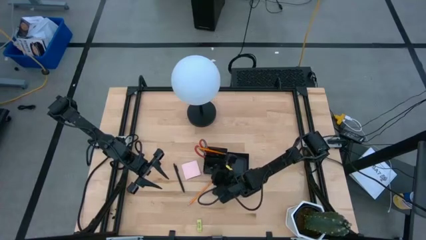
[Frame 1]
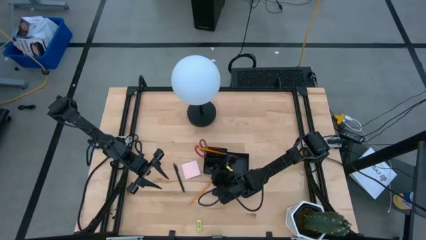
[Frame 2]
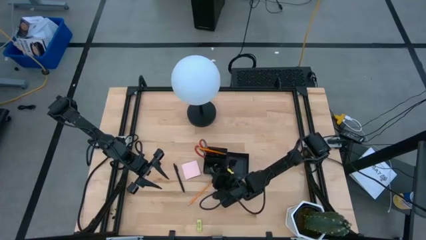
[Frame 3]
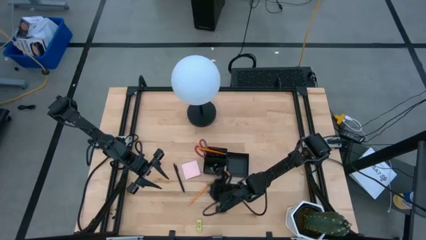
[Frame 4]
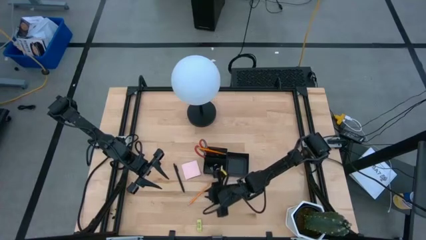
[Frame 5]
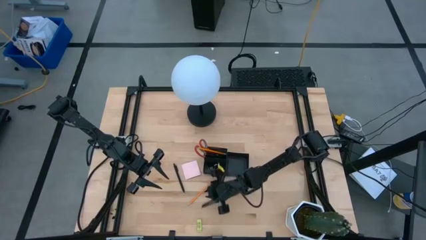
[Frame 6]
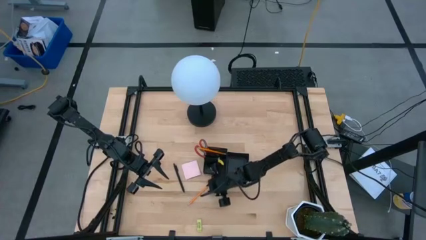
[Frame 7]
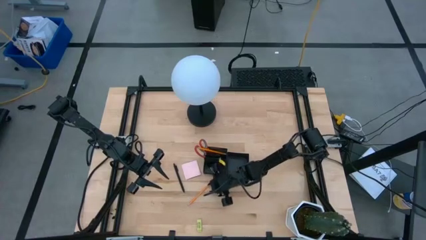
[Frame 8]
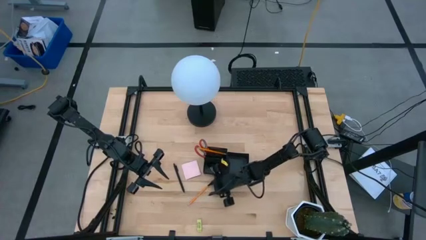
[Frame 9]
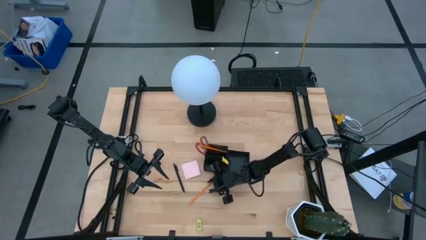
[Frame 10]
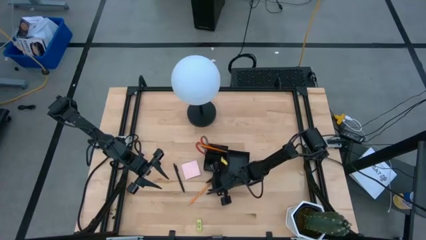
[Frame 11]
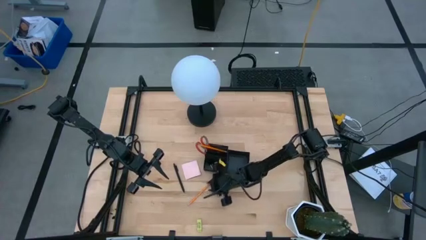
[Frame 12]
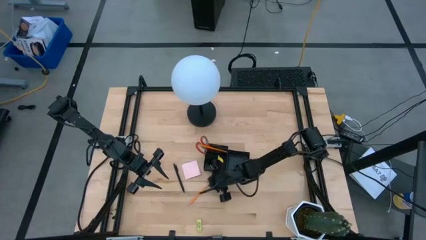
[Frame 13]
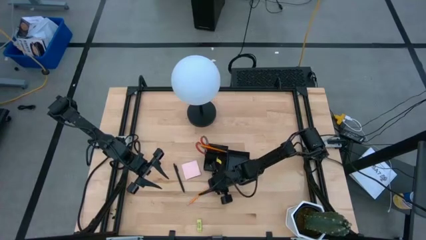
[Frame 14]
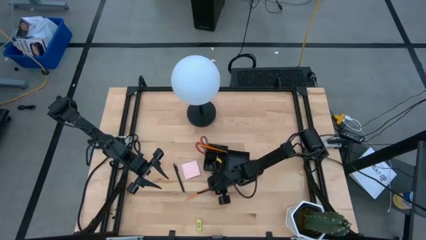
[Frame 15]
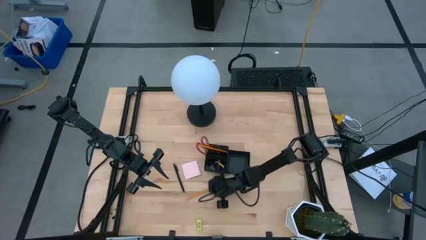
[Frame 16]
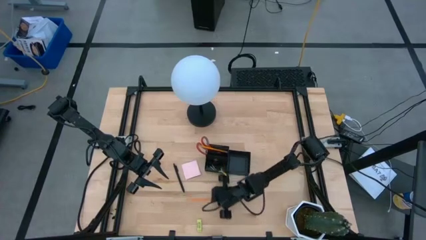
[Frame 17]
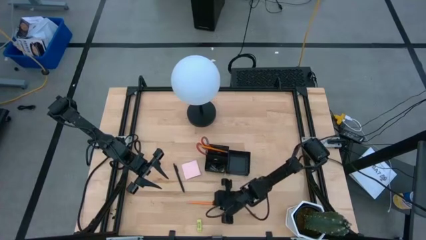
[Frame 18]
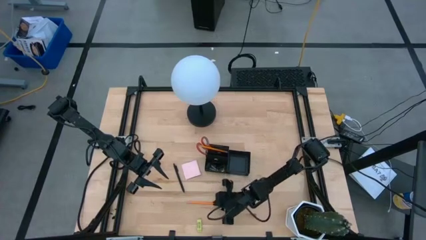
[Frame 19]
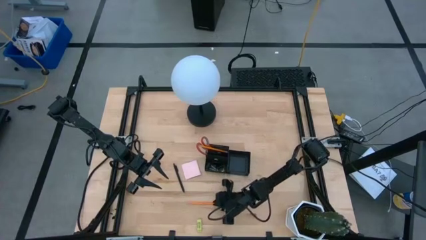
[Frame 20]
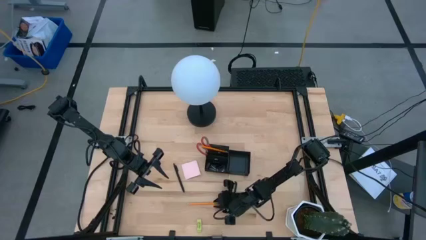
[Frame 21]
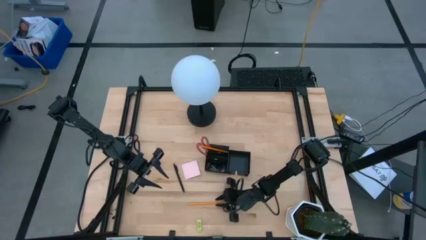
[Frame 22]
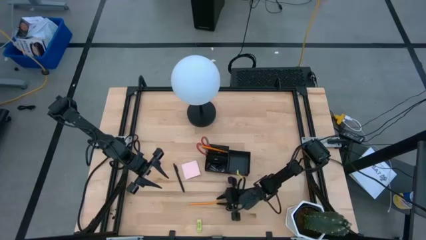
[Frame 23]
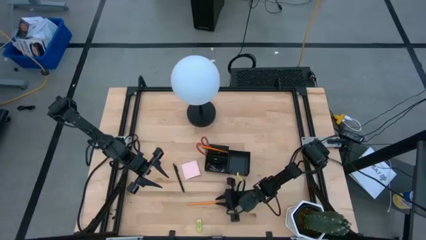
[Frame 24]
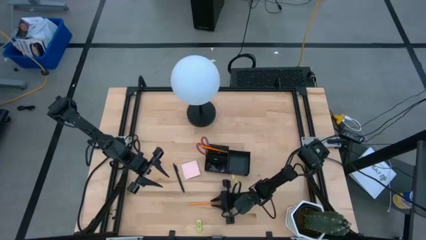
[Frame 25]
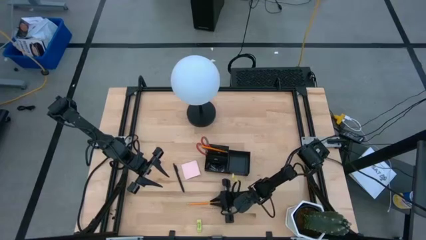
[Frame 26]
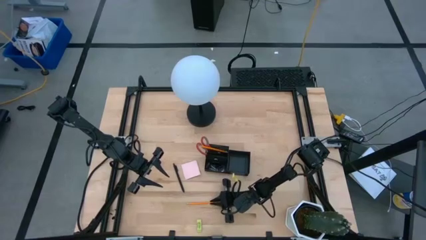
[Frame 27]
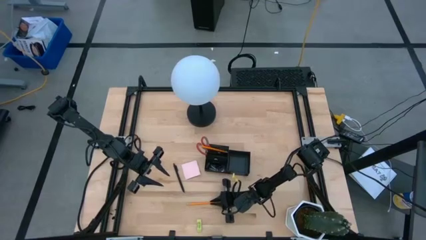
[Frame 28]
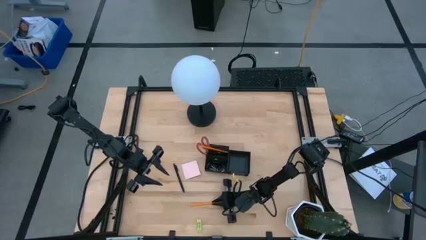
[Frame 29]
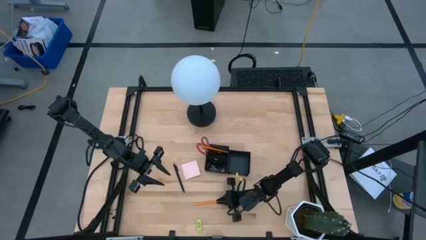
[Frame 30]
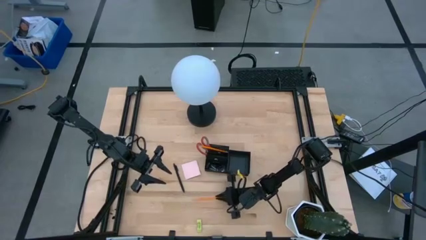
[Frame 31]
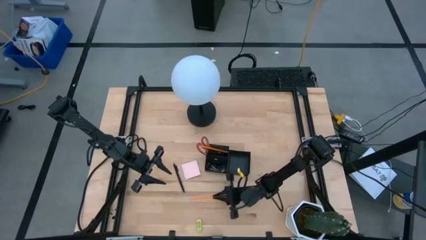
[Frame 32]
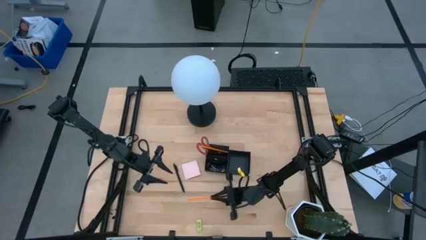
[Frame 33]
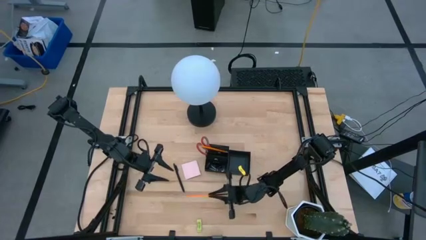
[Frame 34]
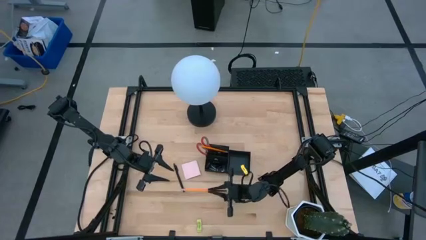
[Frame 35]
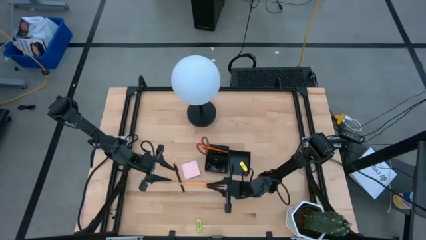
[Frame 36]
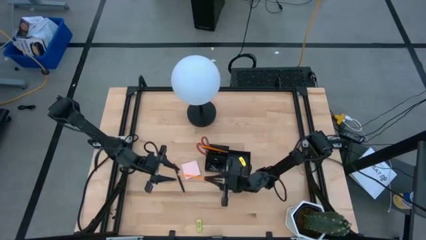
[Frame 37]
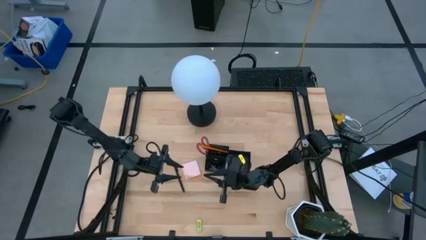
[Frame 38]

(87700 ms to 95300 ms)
Task: Pick and place office supplies into organizer
Put the yellow pencil into the desk organizer

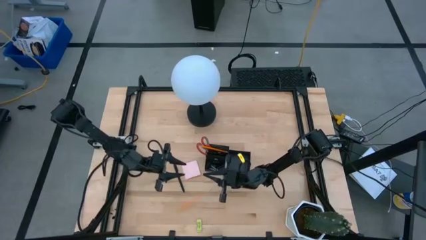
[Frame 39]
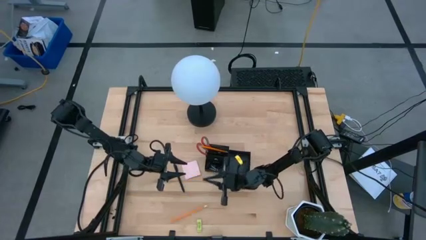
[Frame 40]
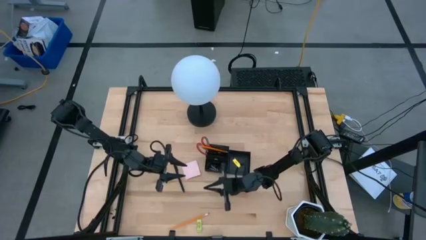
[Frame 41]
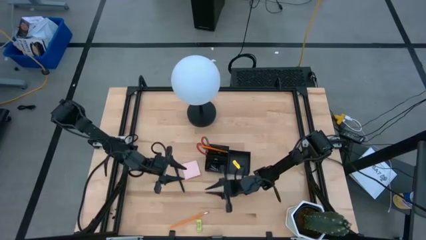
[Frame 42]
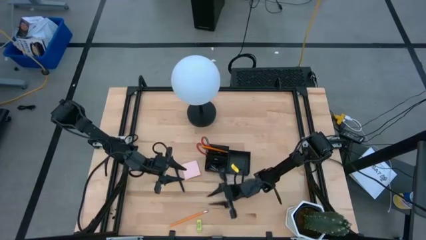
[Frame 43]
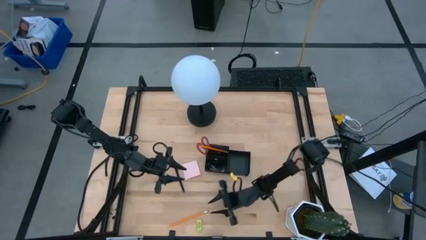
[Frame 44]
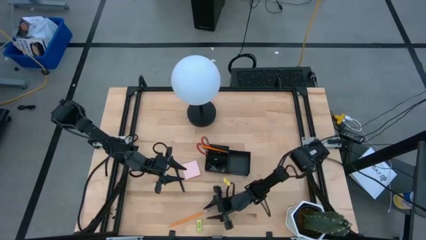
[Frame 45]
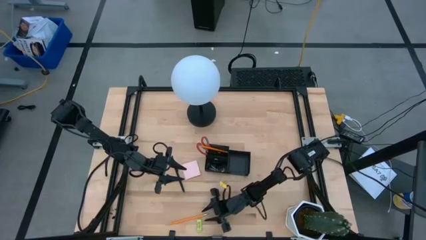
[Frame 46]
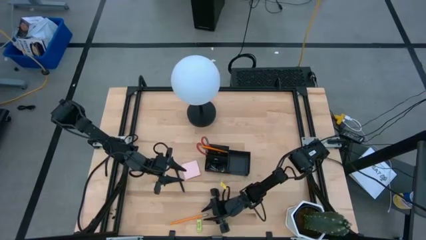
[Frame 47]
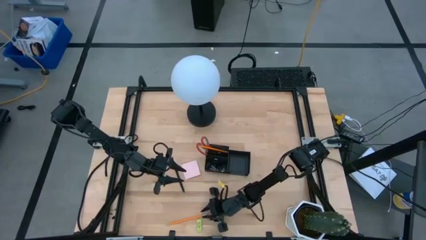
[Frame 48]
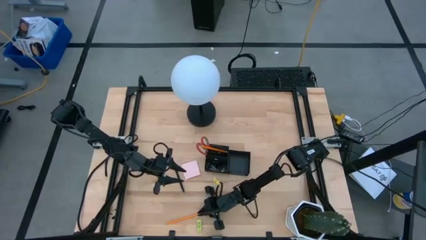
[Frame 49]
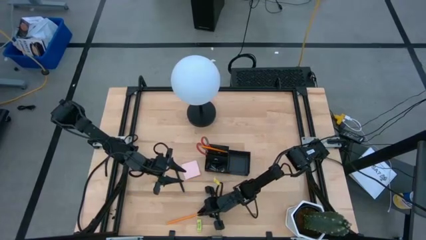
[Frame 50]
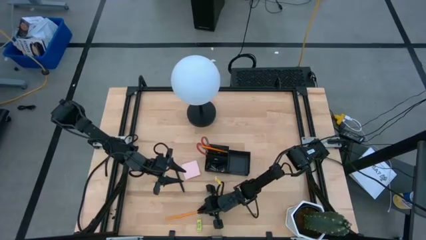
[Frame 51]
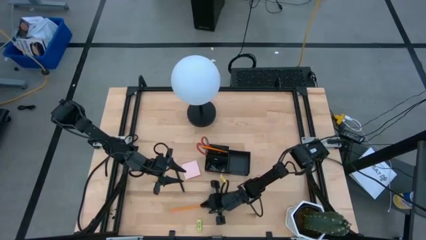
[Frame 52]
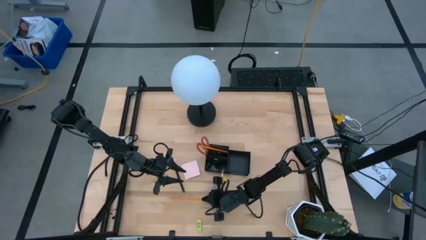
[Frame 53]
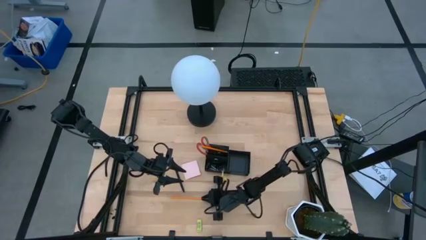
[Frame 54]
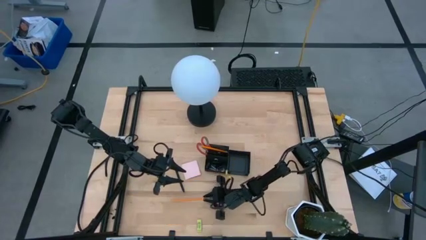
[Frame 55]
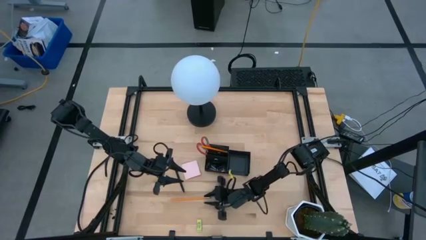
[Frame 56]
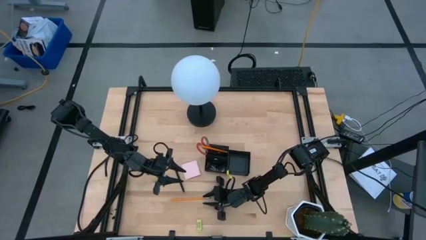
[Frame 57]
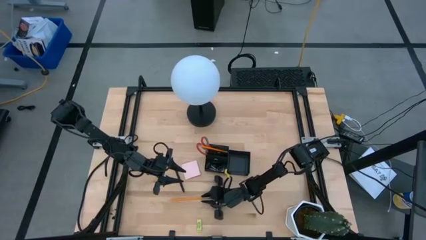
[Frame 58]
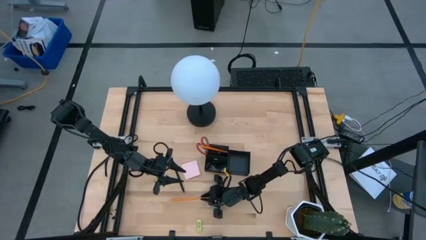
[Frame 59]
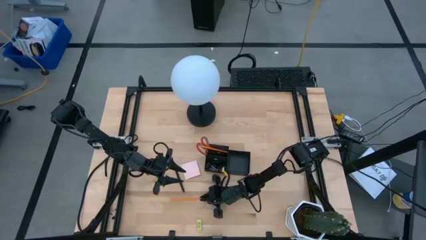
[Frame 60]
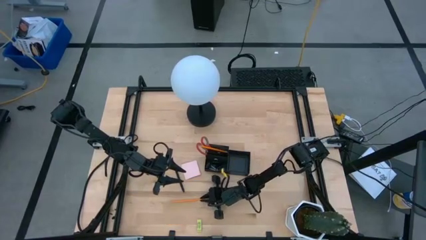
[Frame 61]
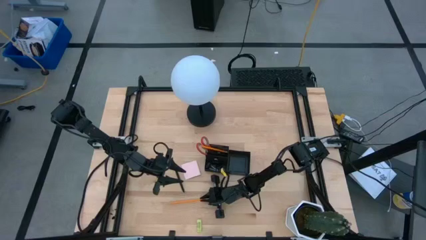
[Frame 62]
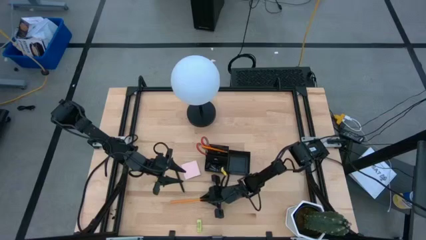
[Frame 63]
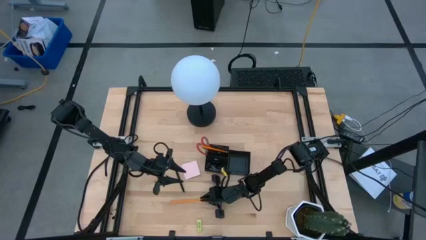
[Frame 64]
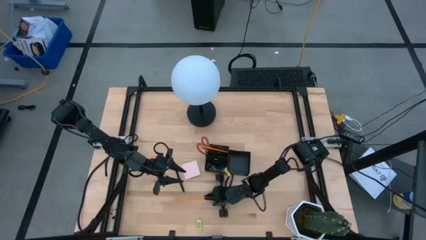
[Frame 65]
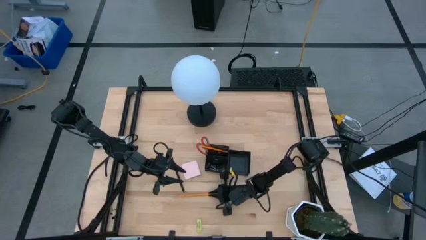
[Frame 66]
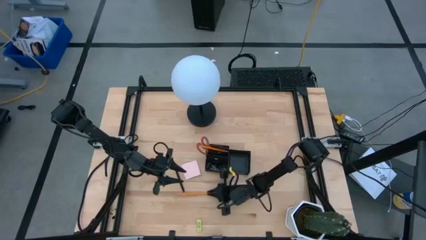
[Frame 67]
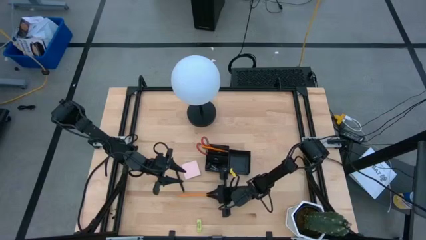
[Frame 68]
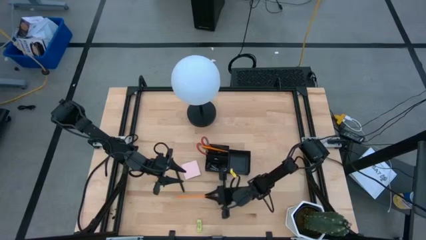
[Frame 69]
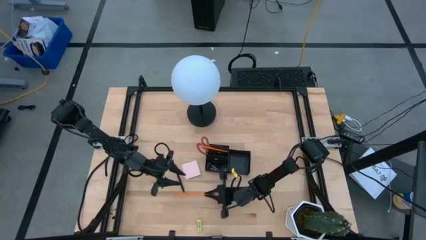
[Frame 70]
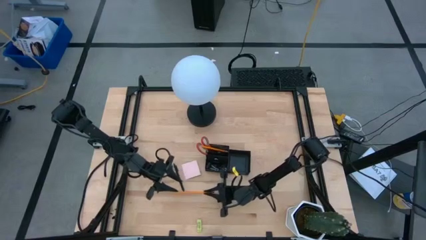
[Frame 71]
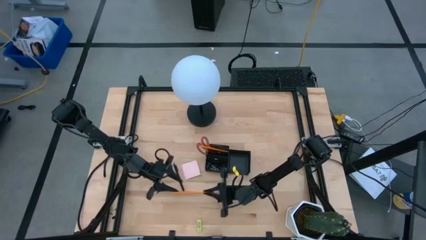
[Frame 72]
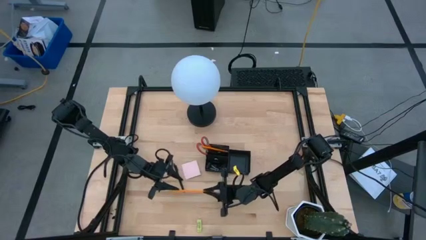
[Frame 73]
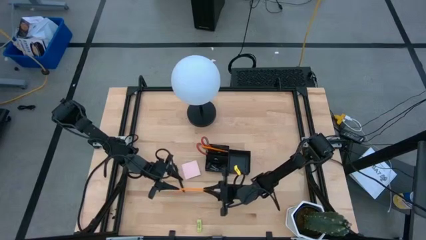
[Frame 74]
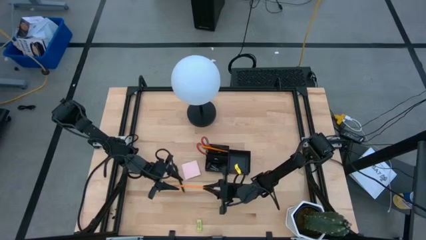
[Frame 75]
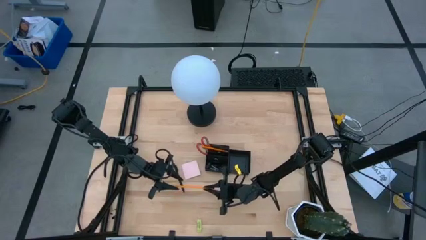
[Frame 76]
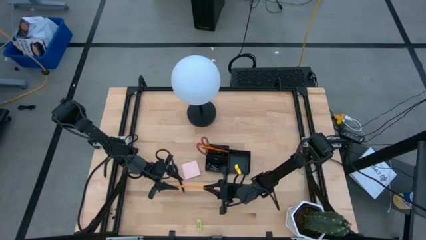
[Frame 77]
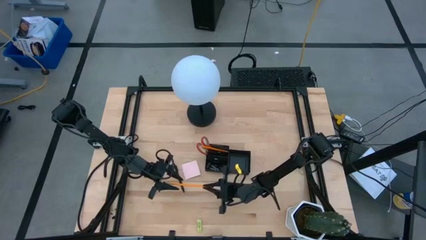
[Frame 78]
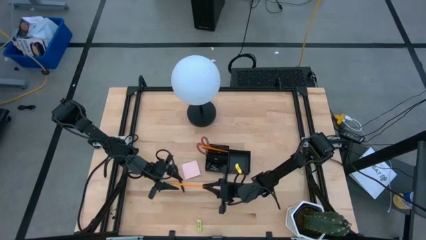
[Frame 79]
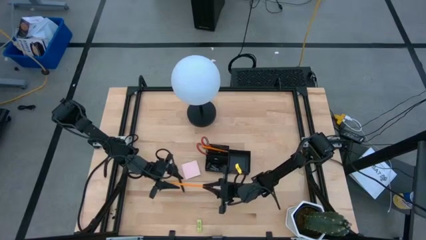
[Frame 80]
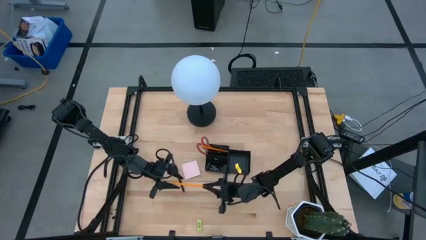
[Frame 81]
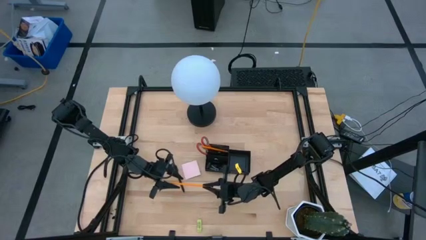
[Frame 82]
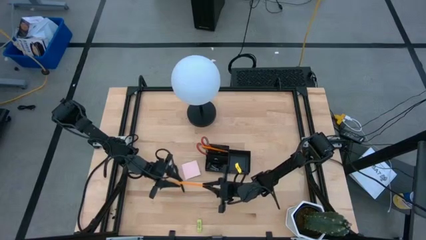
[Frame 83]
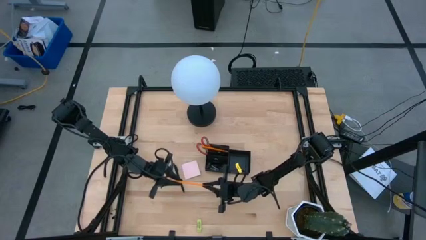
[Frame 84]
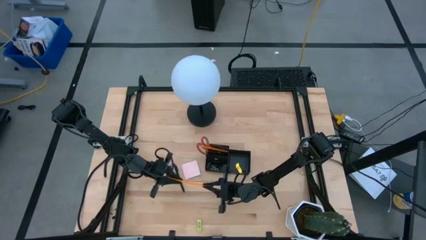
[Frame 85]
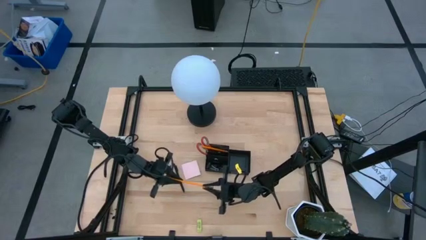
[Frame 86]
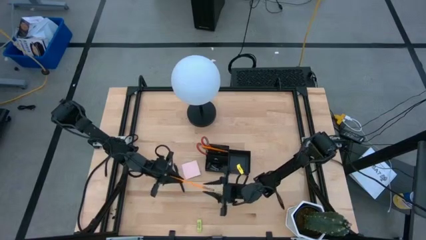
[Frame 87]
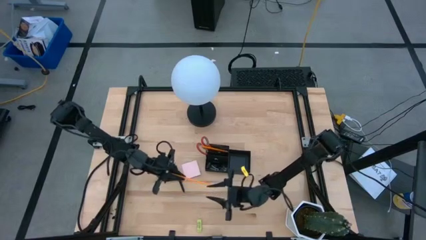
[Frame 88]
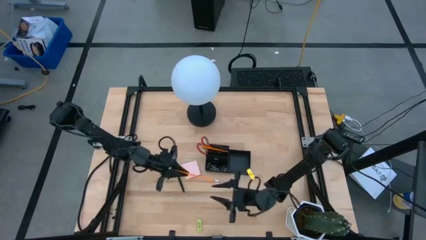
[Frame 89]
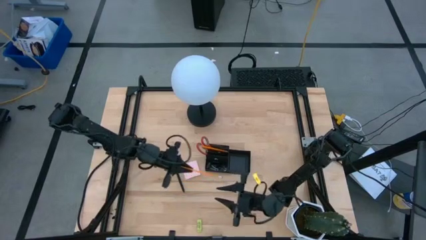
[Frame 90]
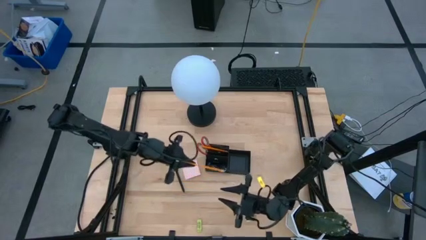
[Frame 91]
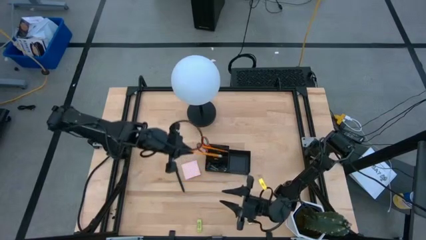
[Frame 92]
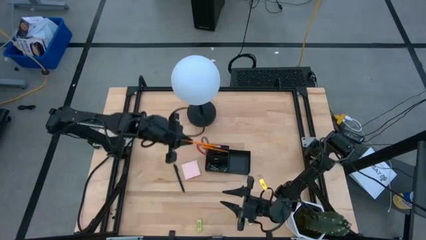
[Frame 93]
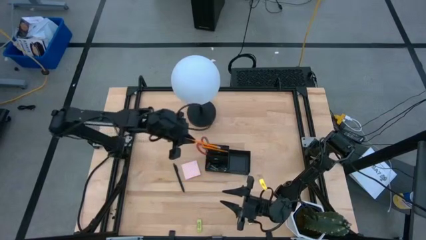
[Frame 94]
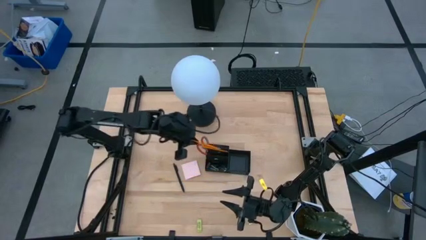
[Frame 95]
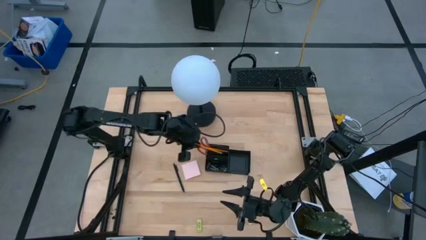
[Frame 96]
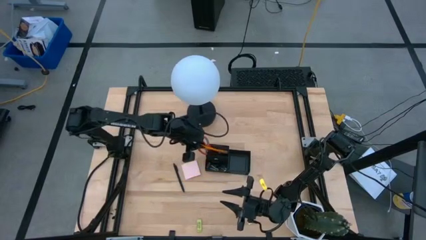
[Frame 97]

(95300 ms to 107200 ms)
Put the yellow pencil into the desk organizer
